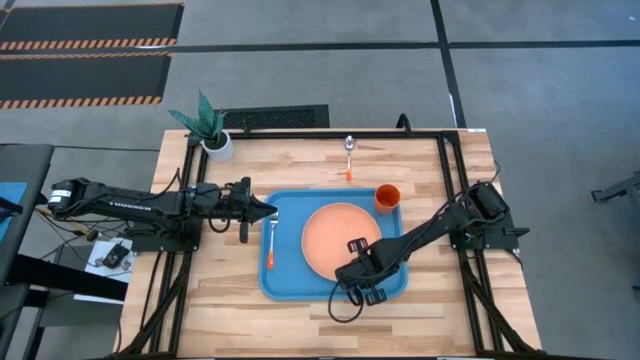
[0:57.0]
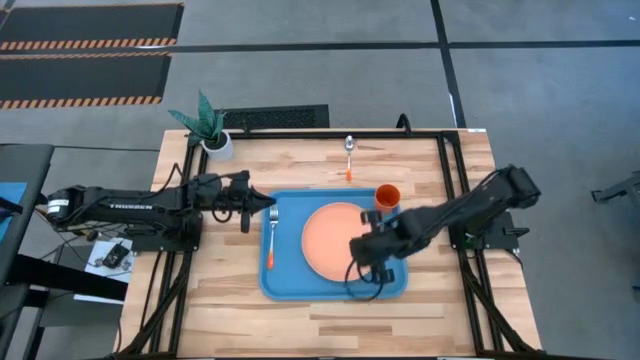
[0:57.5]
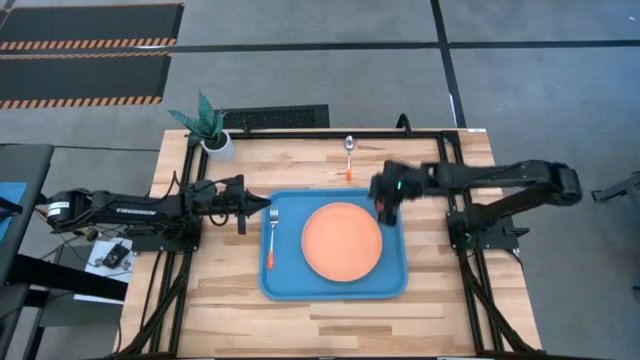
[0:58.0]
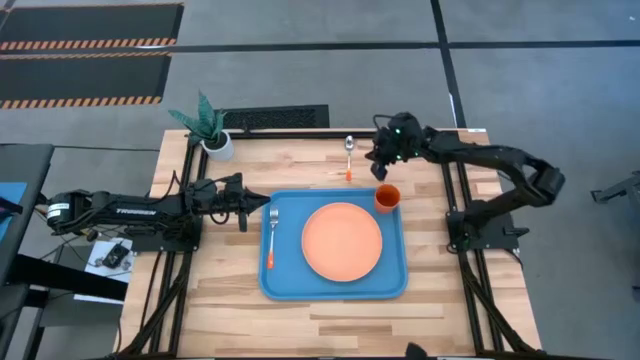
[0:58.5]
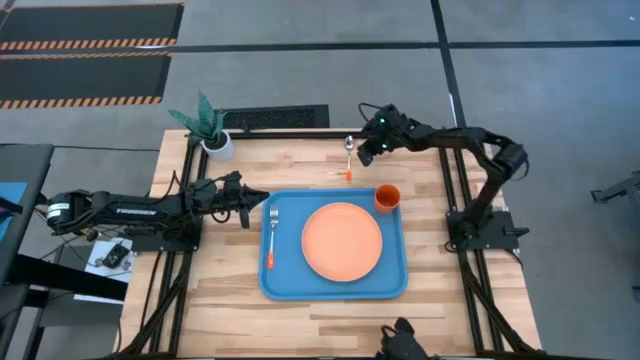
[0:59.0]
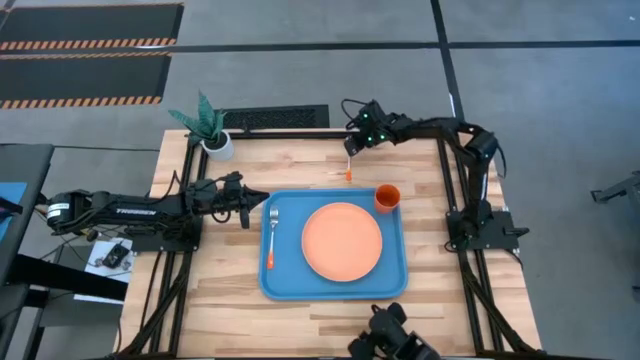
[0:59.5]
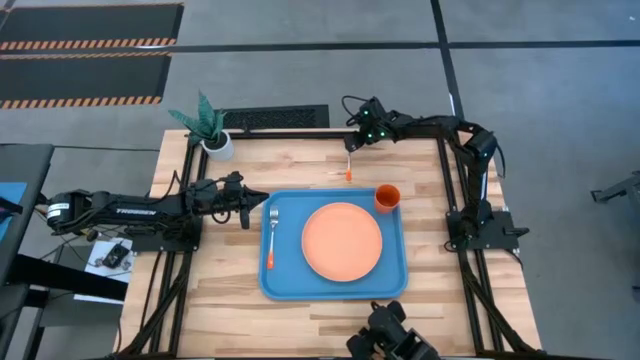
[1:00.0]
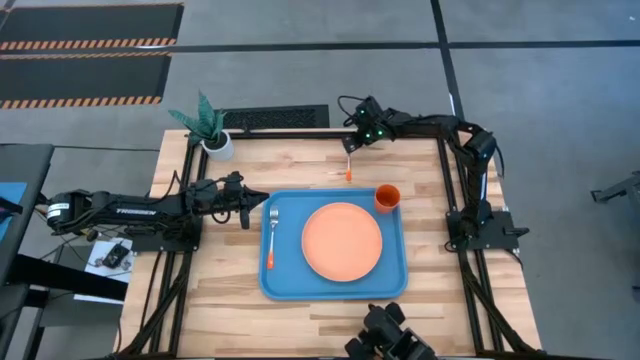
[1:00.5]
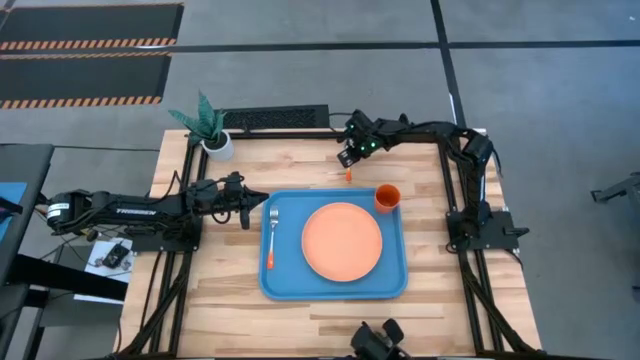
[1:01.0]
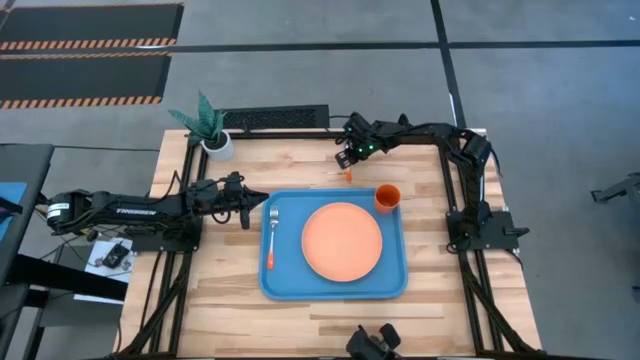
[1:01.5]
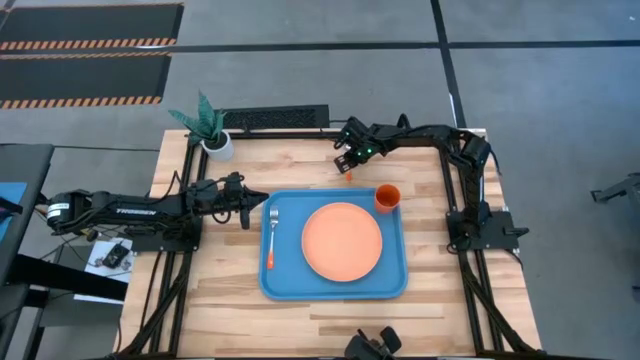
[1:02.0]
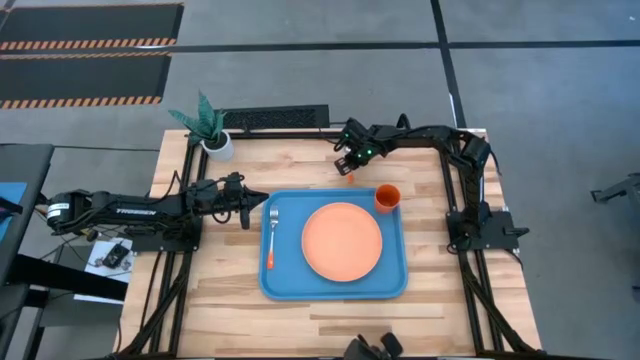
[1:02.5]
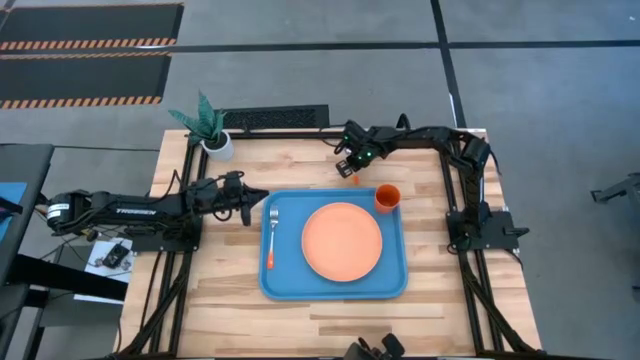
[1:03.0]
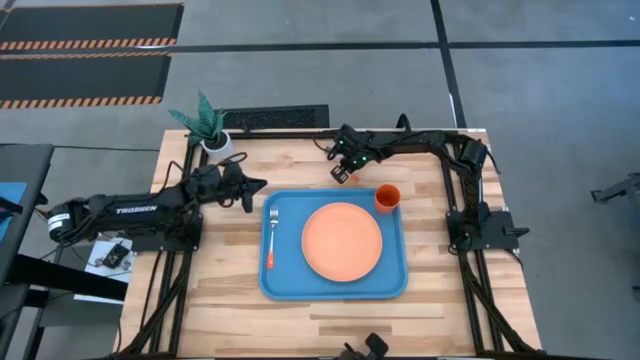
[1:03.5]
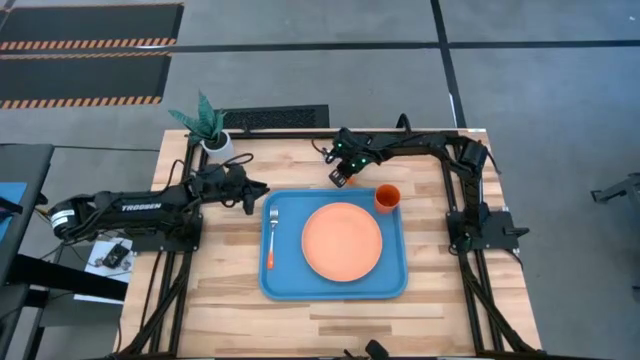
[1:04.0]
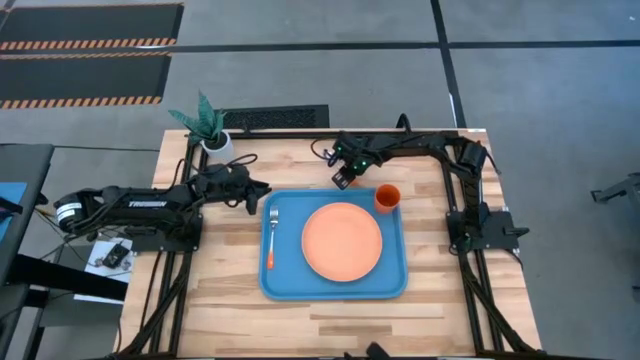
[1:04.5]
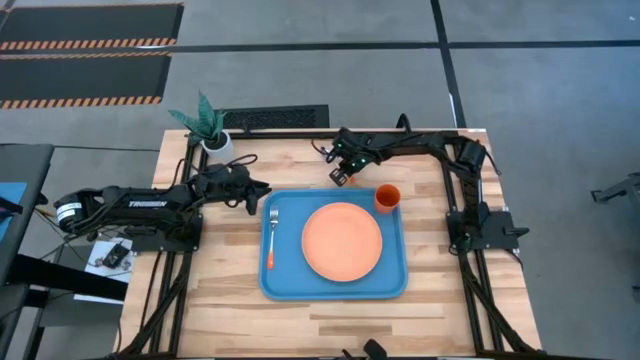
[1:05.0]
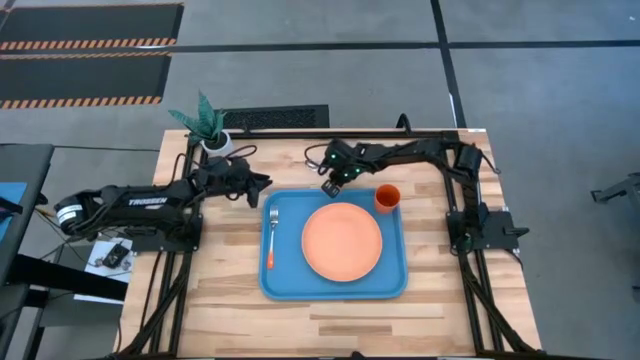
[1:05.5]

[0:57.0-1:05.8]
Task: Pick and place plate/cup/fork/spoon on tray
Put the orange spoon on the right of the orange plate on the blue tray

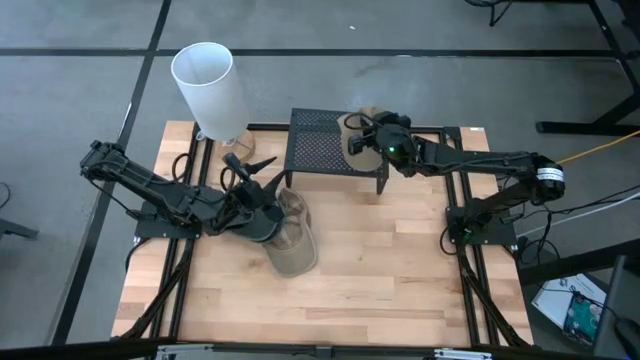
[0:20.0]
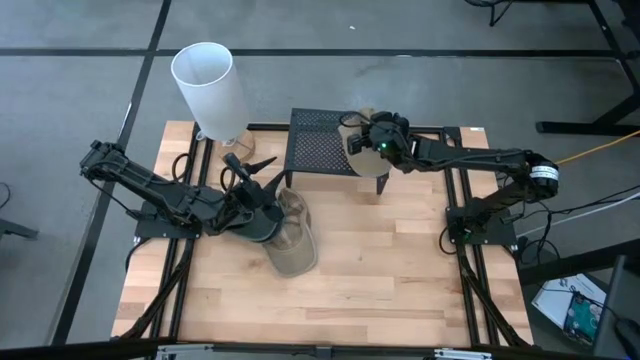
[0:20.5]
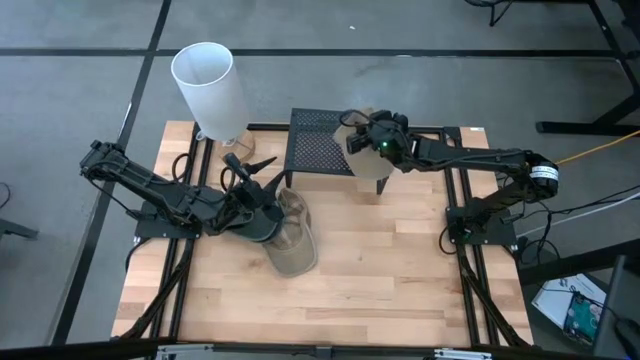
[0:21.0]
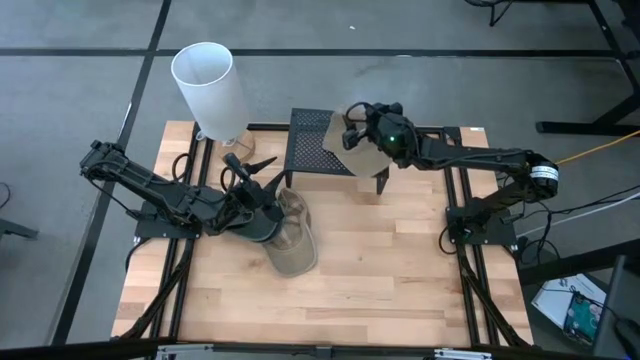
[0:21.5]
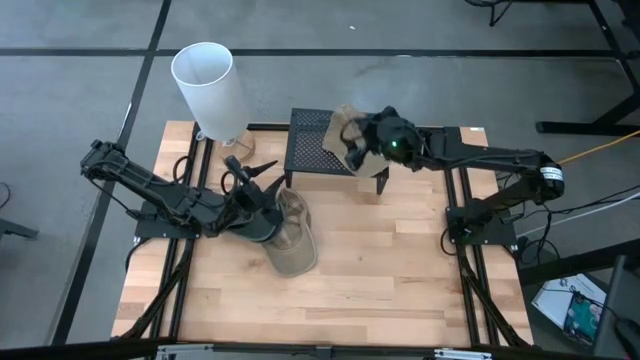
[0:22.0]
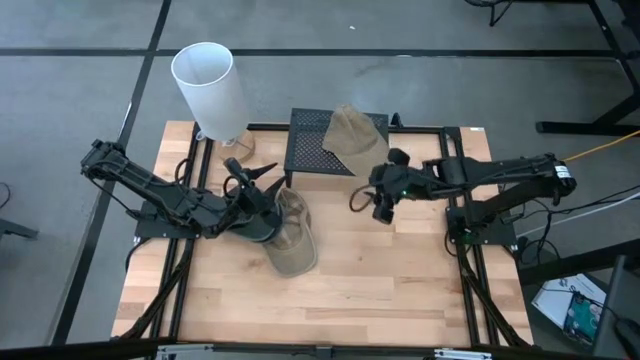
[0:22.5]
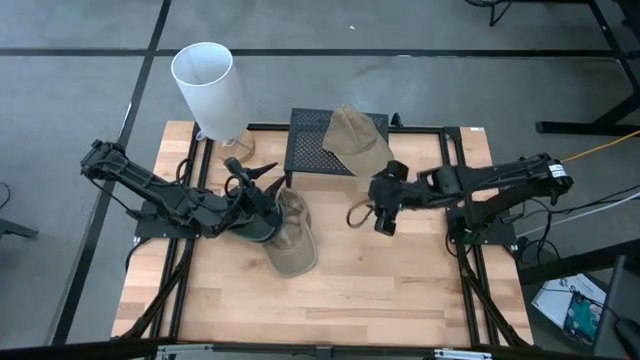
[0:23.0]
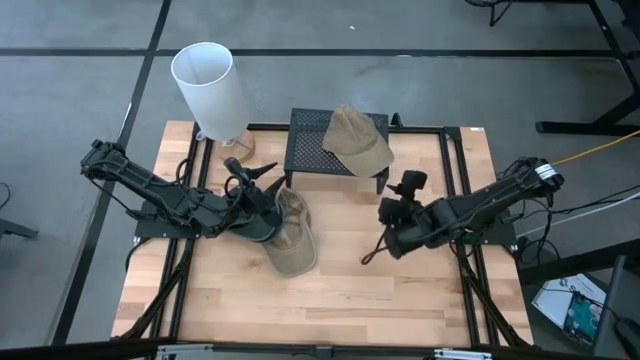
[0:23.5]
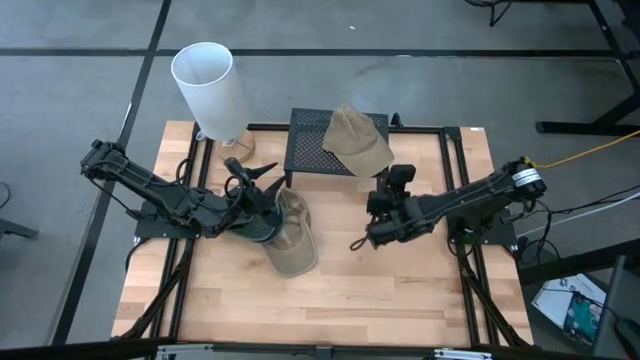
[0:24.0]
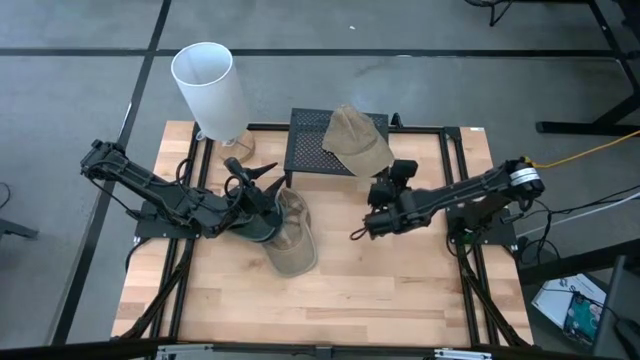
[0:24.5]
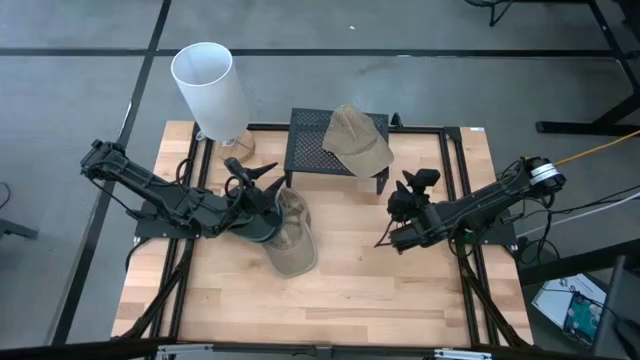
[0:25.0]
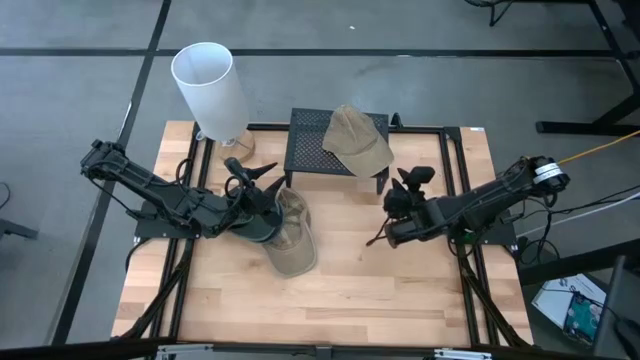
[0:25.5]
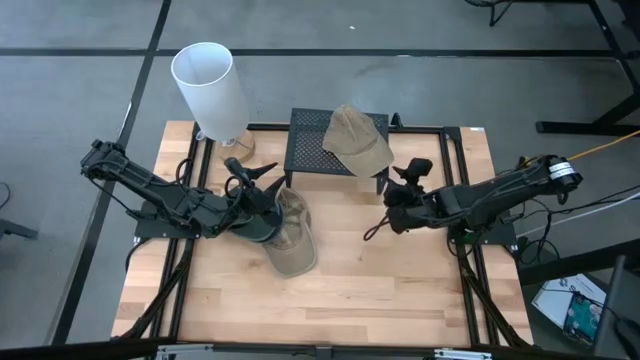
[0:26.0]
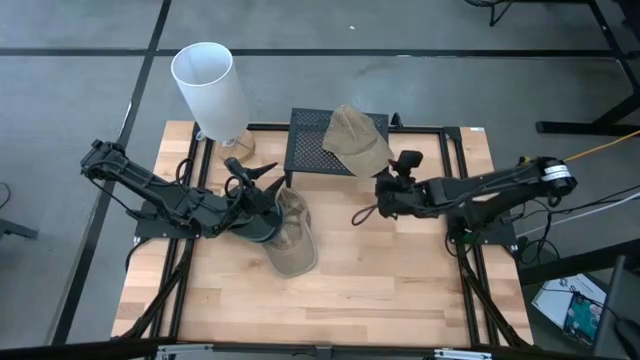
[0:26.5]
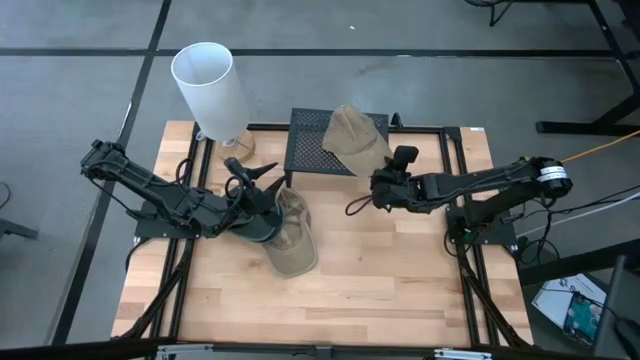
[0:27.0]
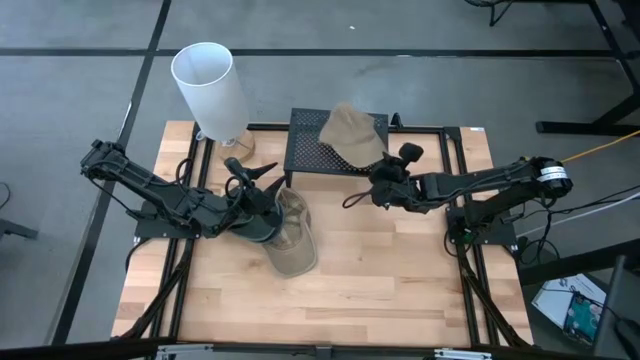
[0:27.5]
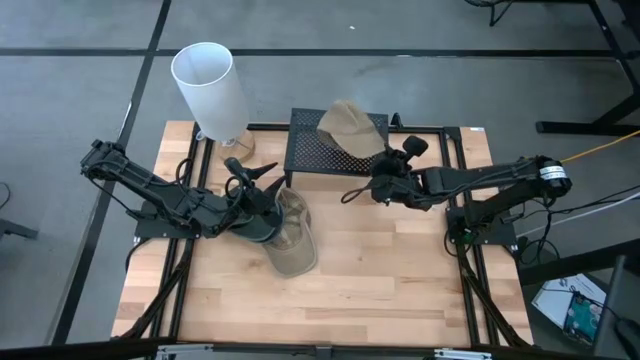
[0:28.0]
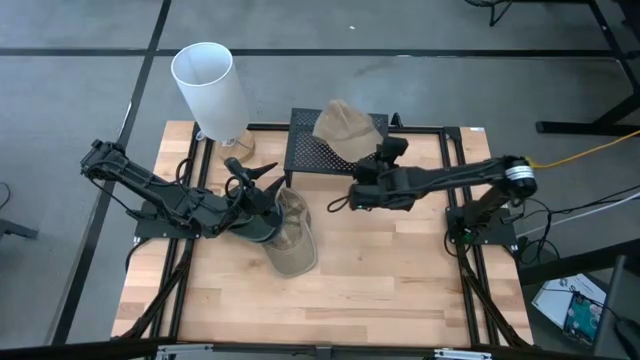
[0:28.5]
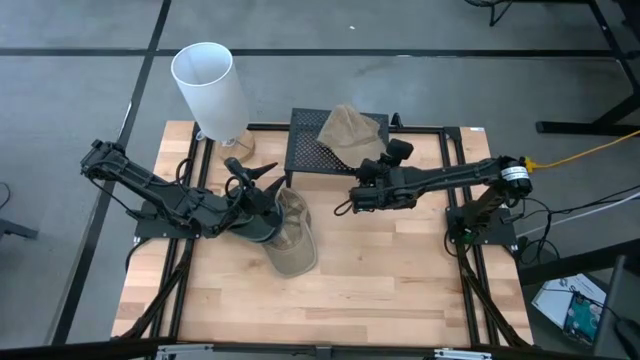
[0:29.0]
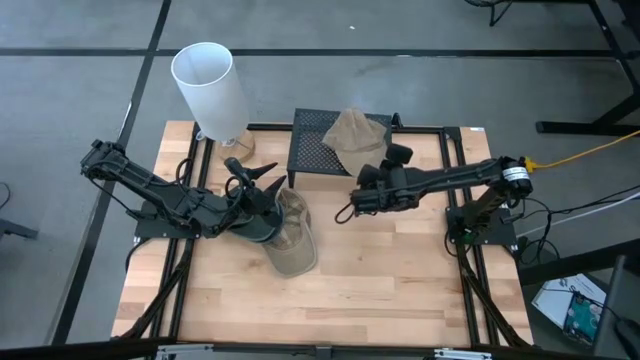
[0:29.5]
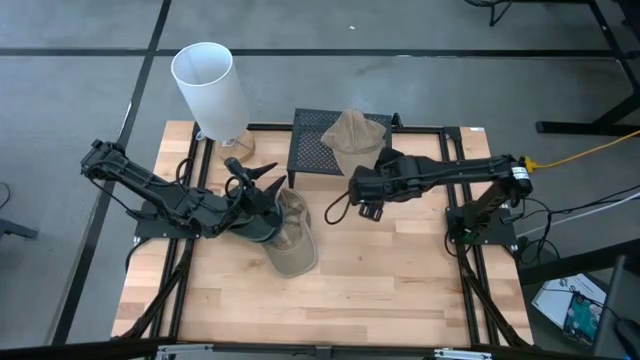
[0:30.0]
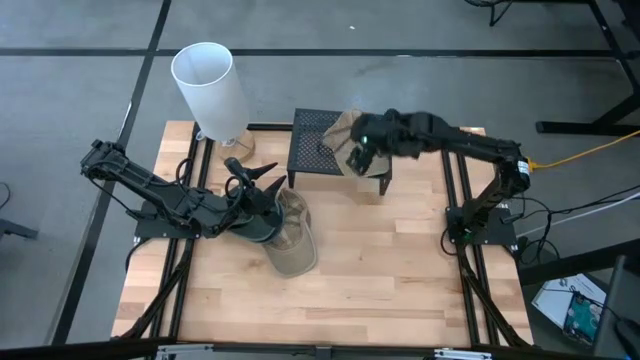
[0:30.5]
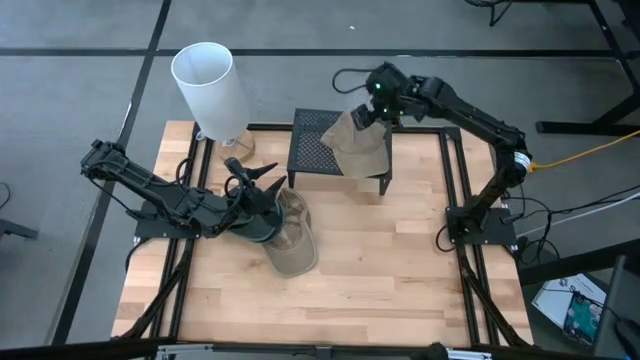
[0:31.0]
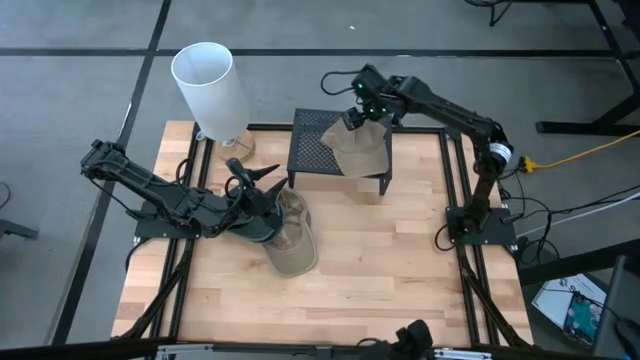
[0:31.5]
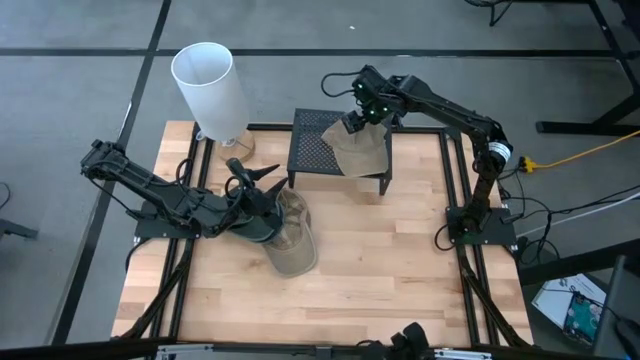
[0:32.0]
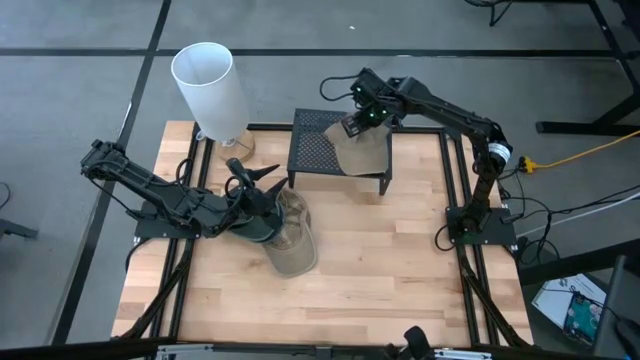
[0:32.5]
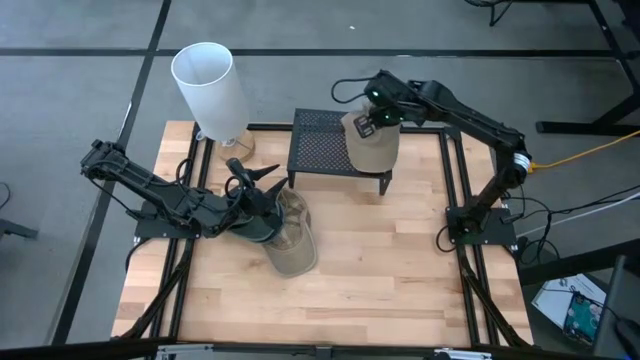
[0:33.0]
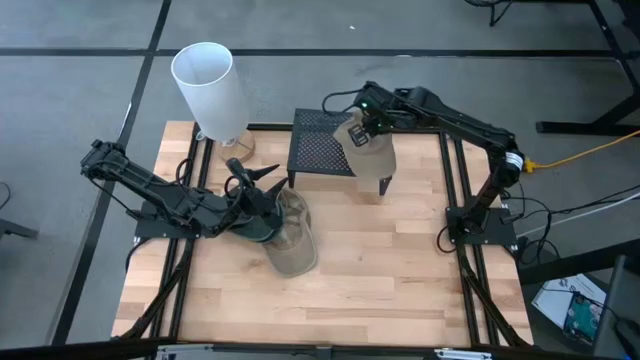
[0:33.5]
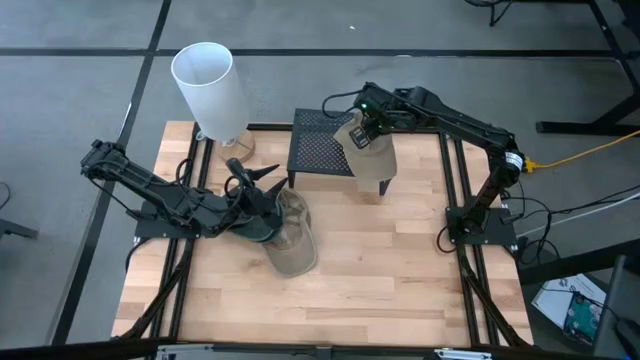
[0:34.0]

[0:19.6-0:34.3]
Task: Pick & Place hat
Put the right brown cap on the shelf
